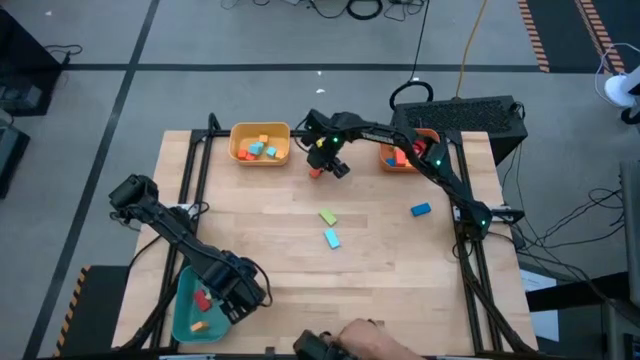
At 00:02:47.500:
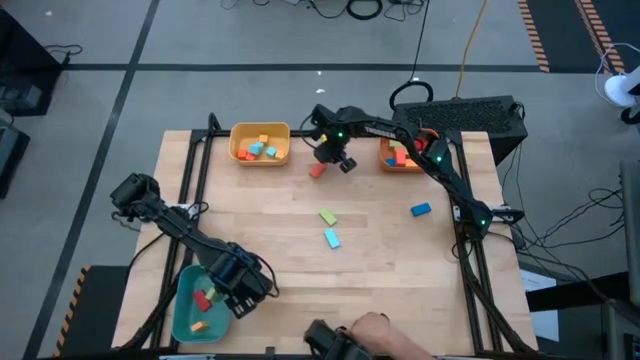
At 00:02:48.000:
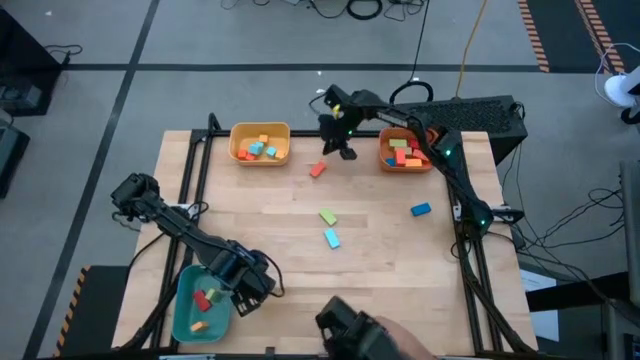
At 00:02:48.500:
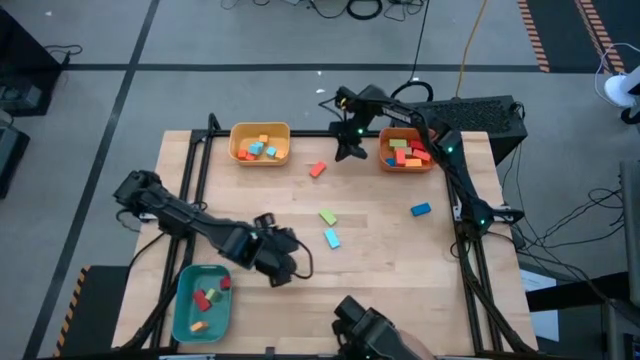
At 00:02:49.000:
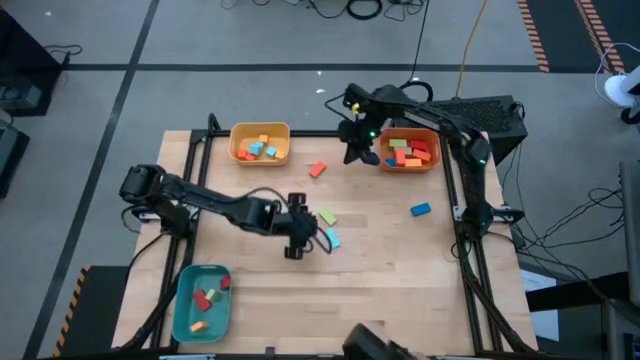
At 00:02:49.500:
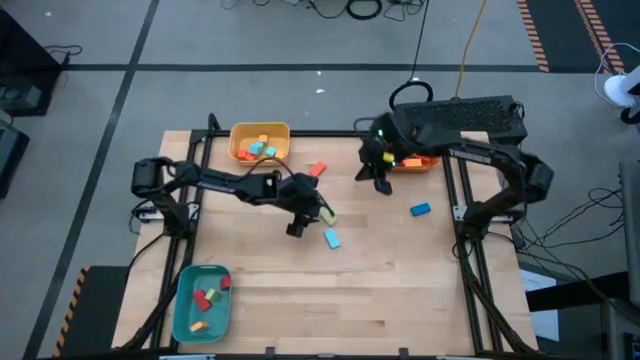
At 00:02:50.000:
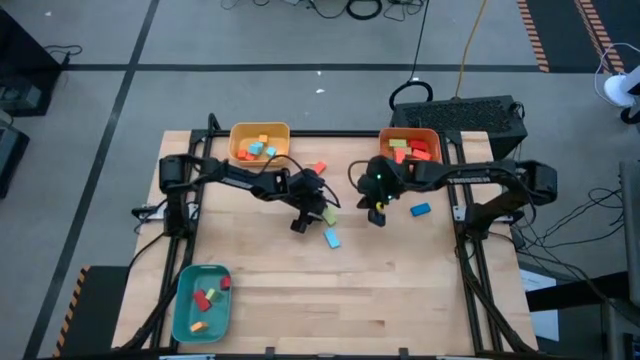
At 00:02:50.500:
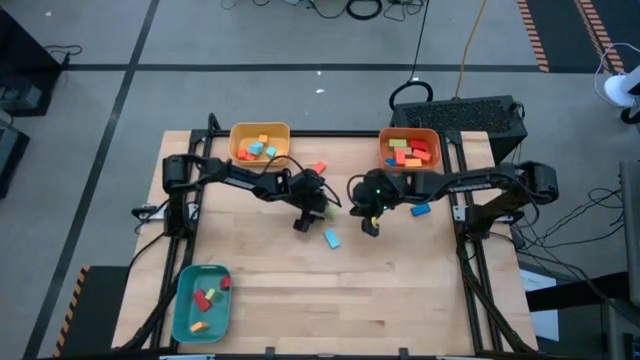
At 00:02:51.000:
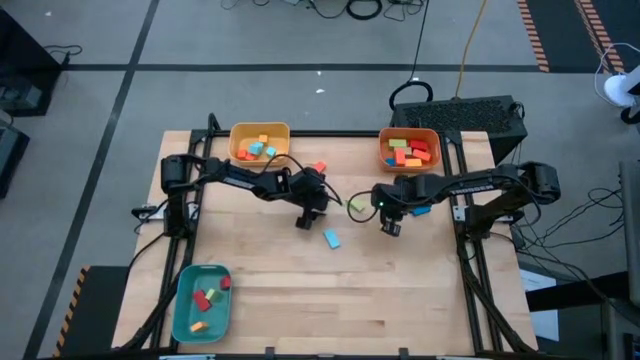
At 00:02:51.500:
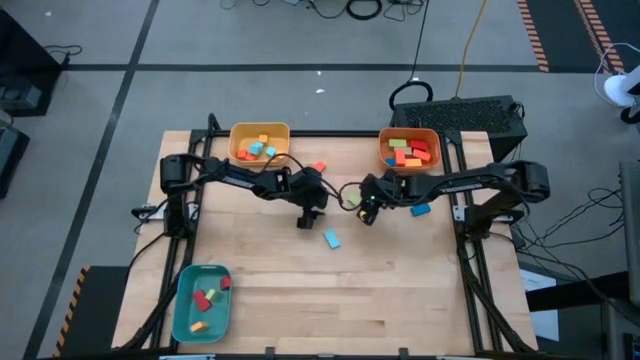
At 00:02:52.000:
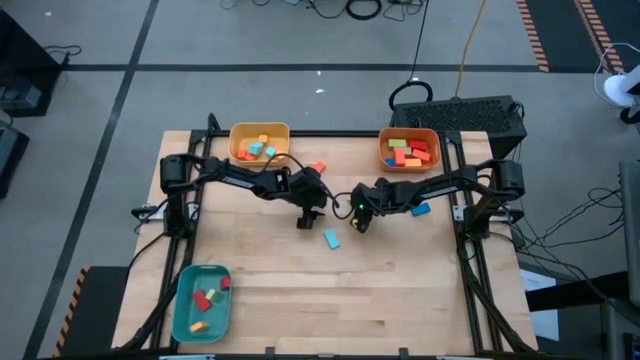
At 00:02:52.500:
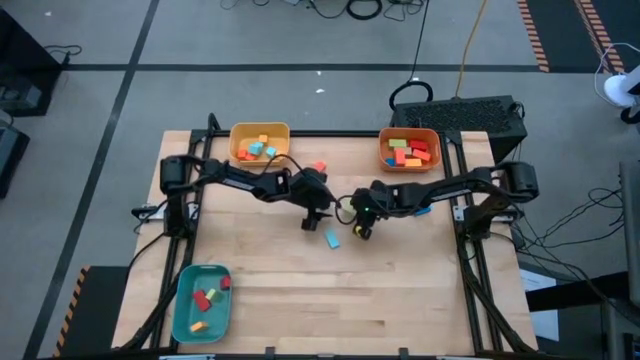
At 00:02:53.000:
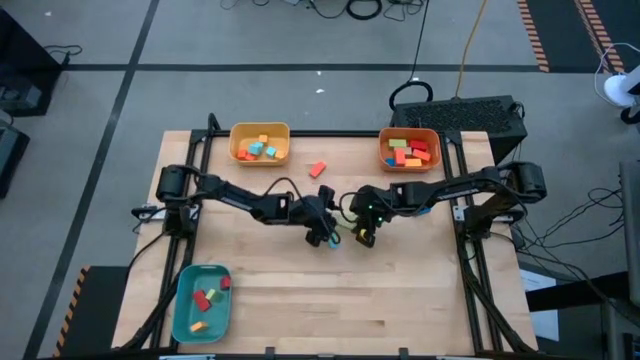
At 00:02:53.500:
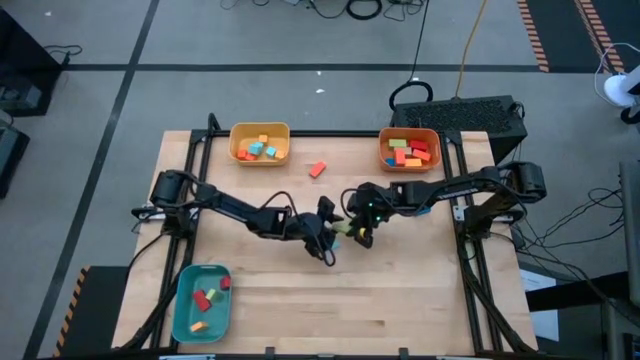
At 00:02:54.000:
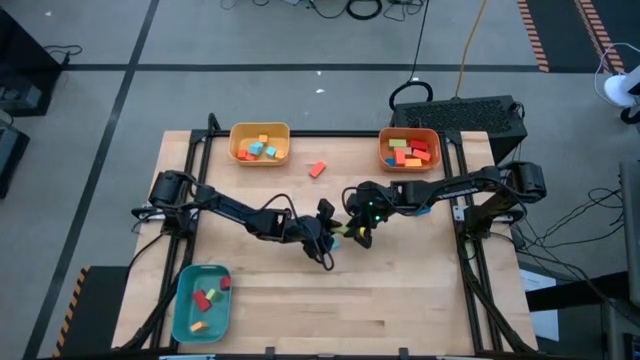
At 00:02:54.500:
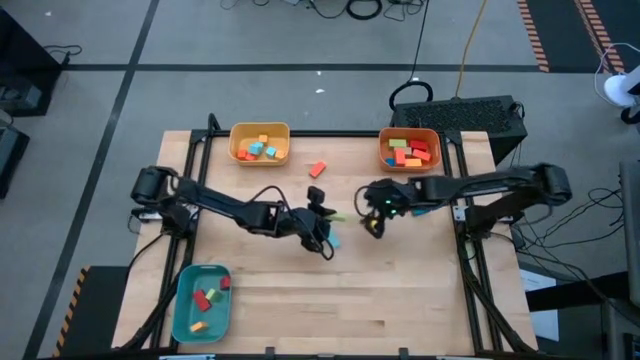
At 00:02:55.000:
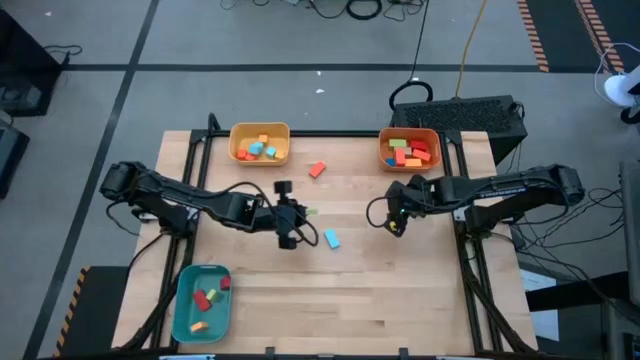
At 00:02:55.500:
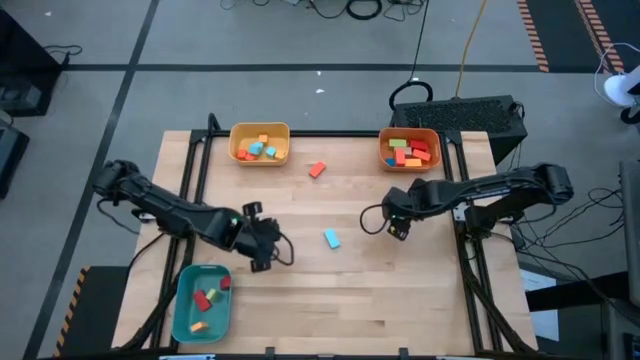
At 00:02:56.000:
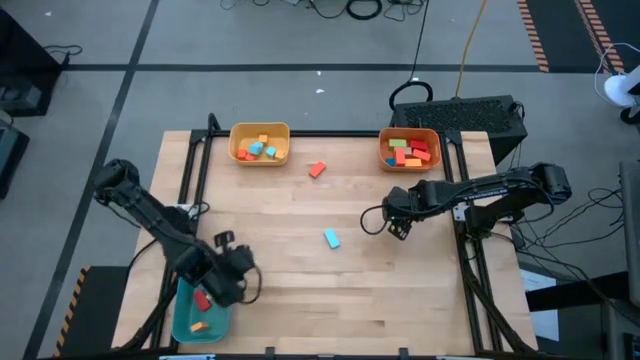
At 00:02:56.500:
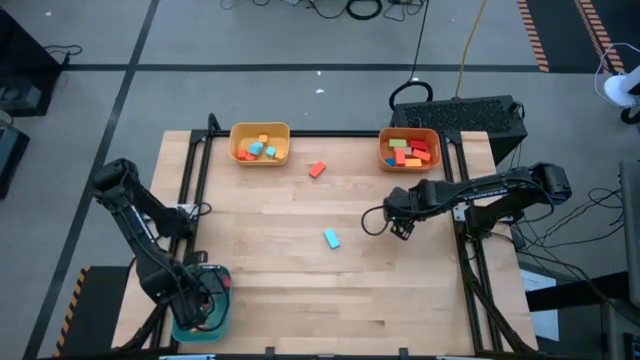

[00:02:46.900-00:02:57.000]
Task: Sort blocks by size
Put the large green block into the blue bin

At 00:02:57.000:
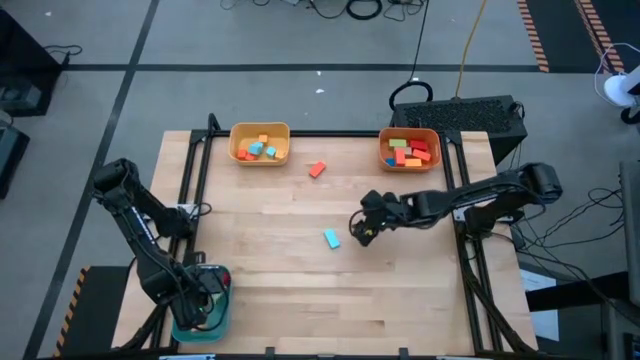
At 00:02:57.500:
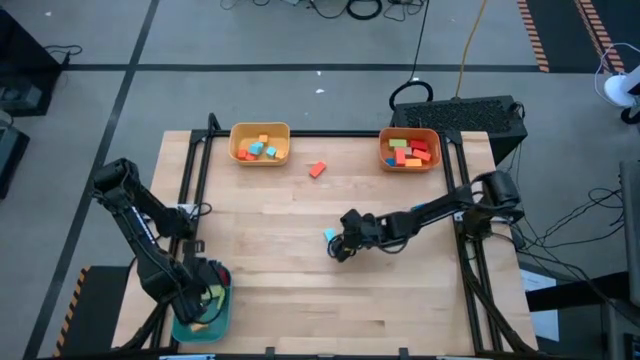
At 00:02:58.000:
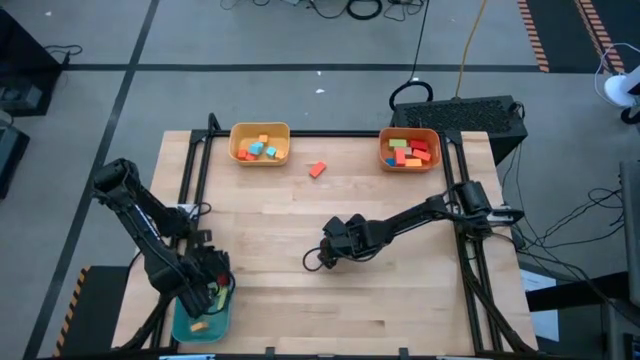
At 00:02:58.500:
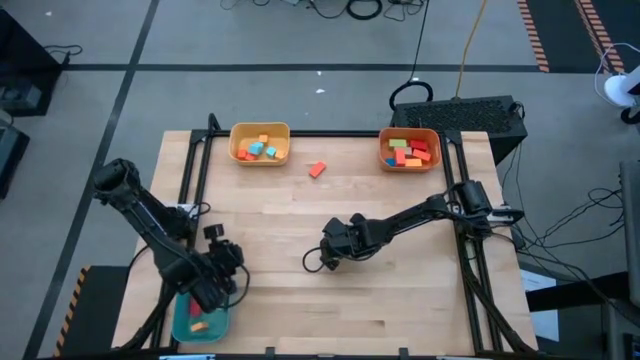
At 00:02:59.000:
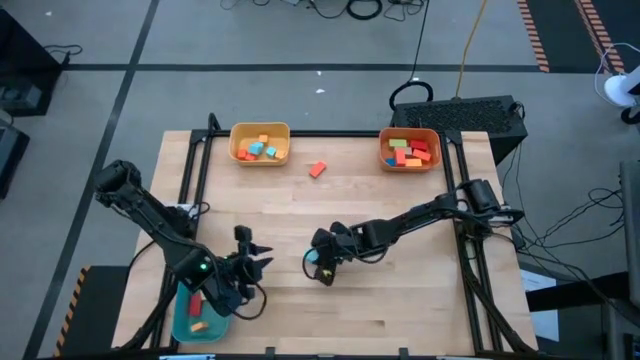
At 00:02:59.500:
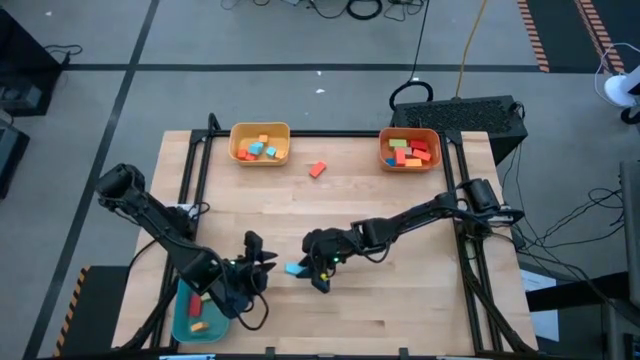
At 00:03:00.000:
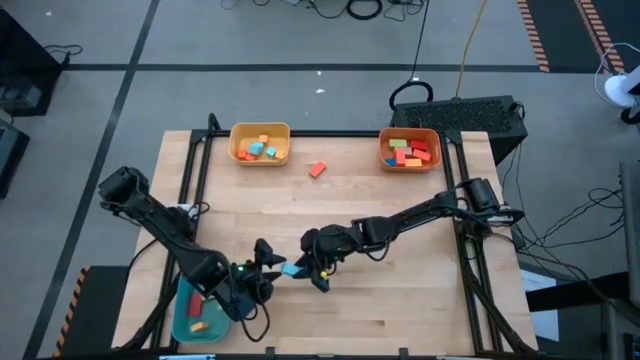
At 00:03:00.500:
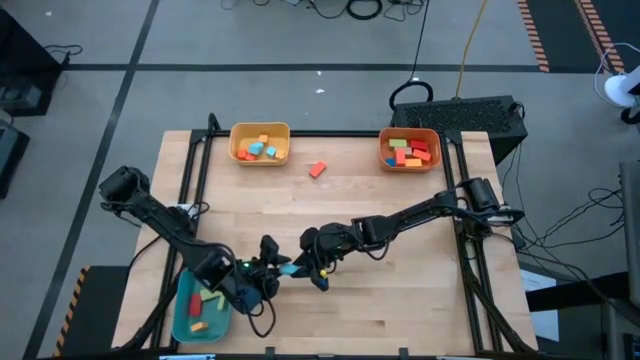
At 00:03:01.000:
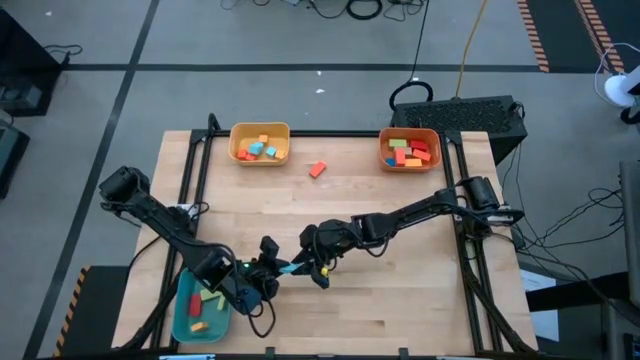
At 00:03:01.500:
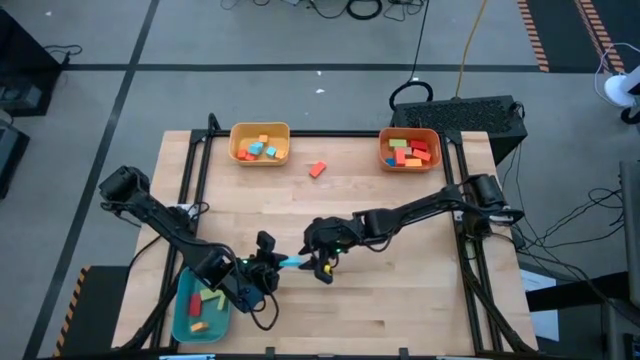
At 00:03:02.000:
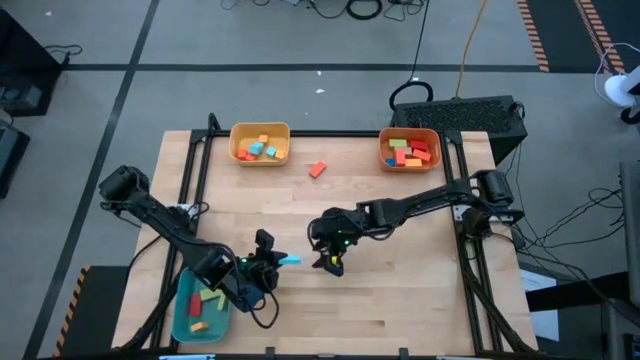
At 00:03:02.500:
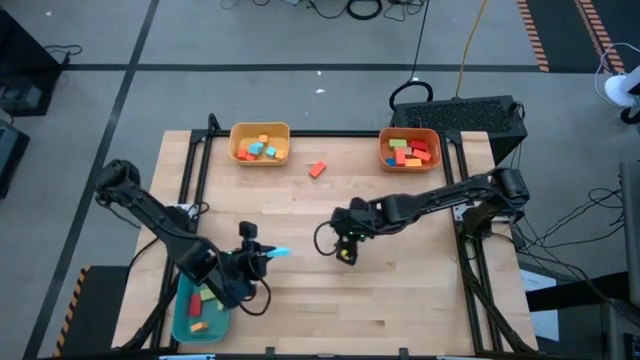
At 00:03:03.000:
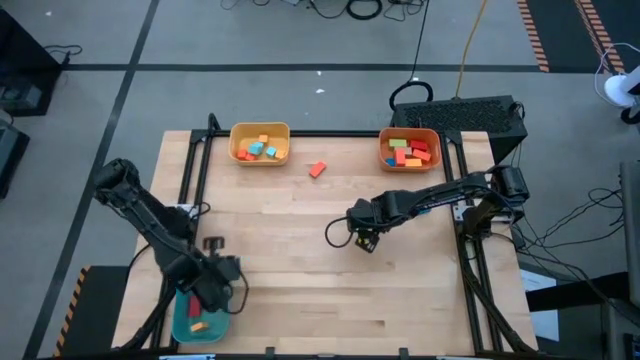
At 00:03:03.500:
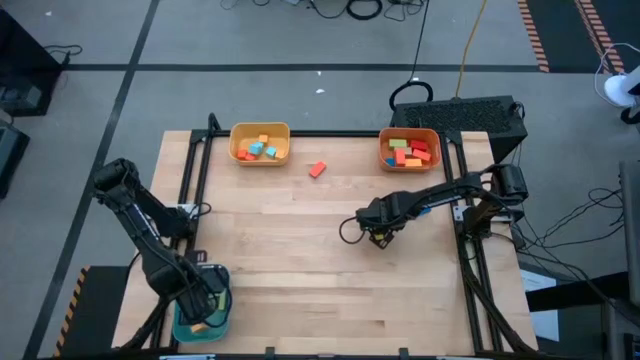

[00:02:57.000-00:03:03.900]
Put the large light blue block into the blue bin
